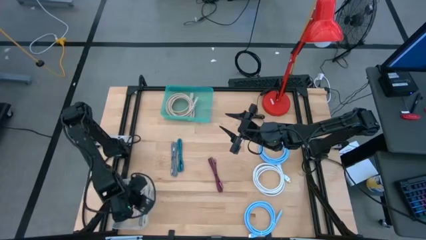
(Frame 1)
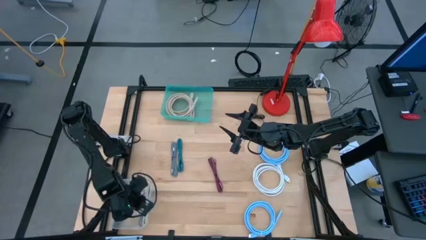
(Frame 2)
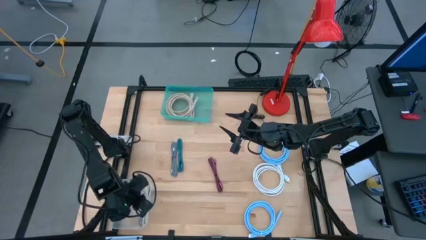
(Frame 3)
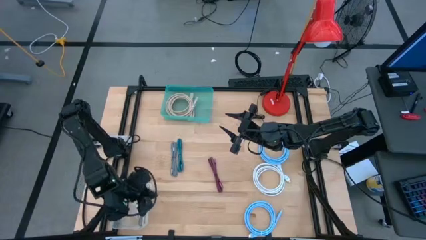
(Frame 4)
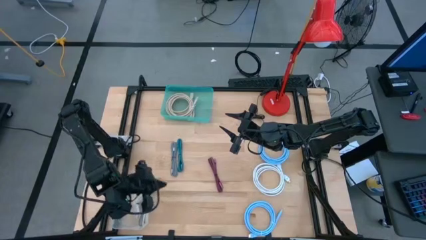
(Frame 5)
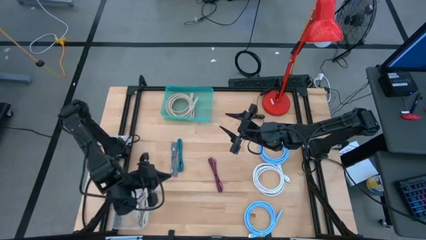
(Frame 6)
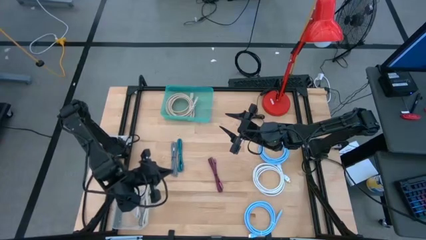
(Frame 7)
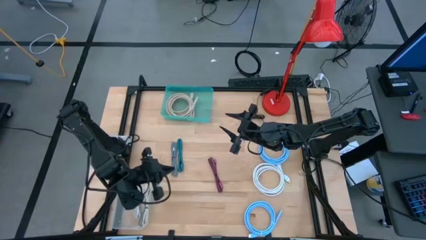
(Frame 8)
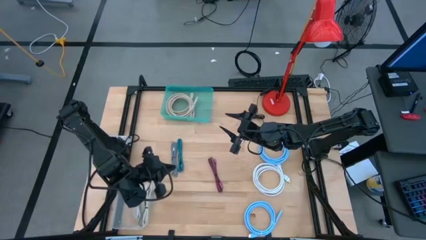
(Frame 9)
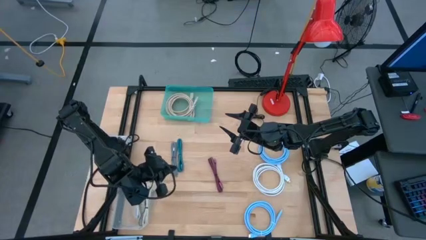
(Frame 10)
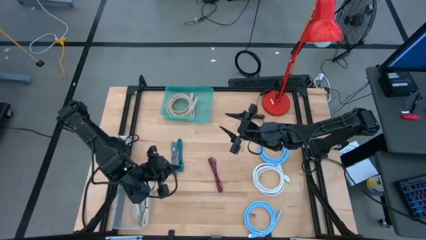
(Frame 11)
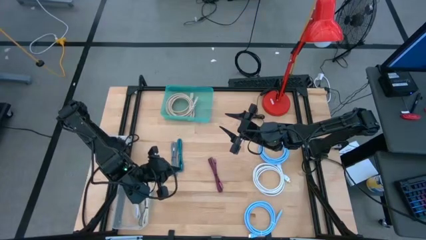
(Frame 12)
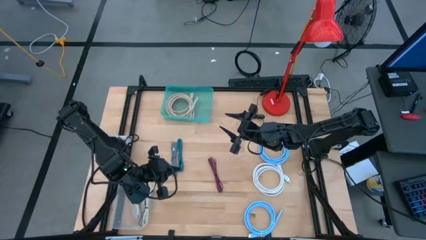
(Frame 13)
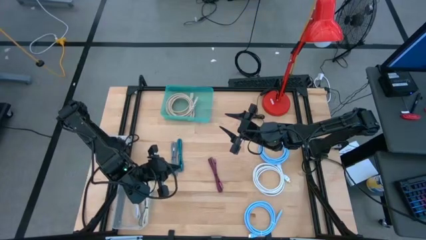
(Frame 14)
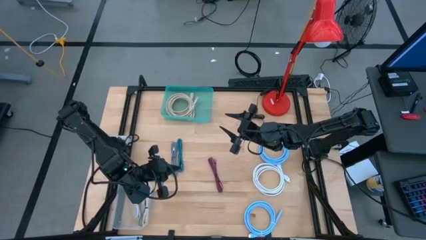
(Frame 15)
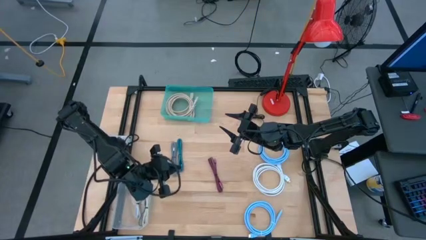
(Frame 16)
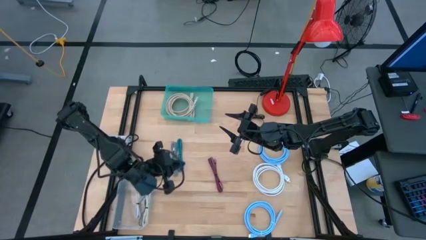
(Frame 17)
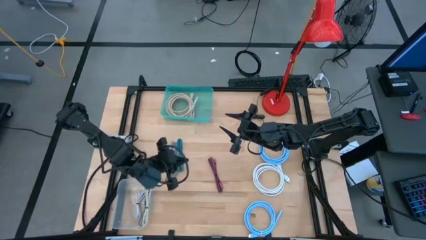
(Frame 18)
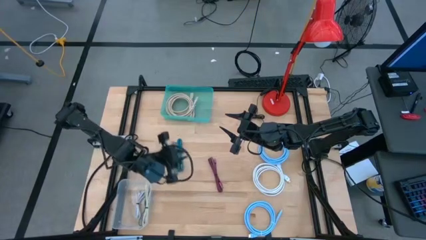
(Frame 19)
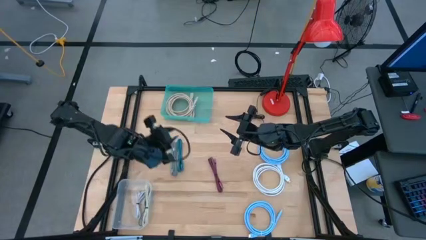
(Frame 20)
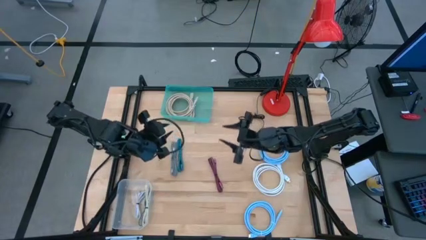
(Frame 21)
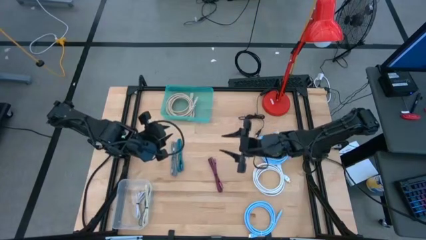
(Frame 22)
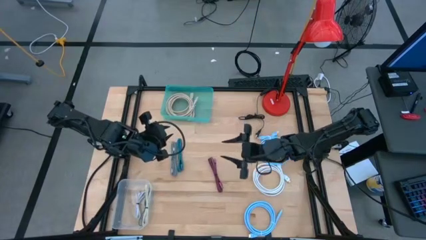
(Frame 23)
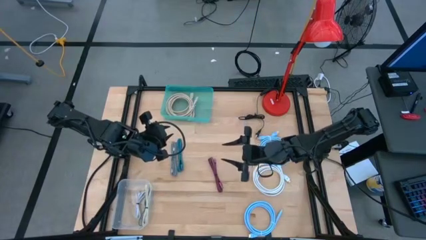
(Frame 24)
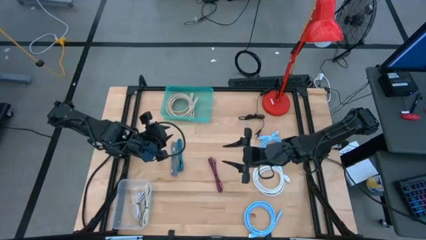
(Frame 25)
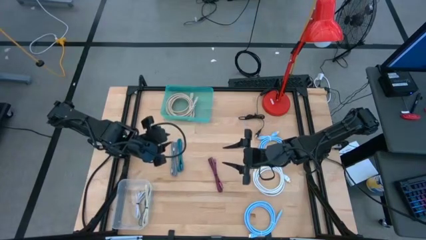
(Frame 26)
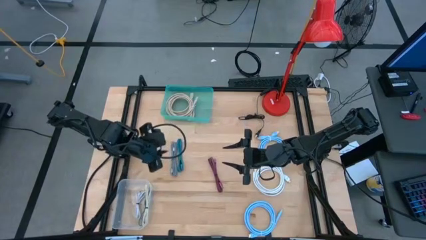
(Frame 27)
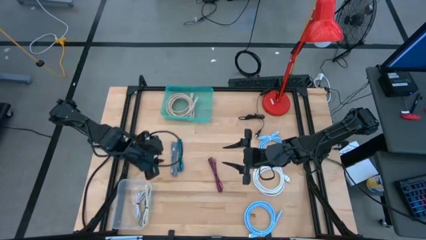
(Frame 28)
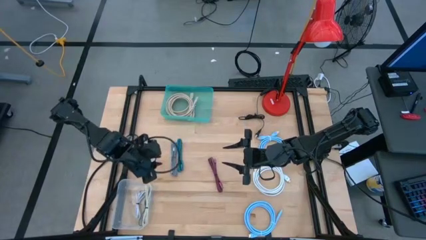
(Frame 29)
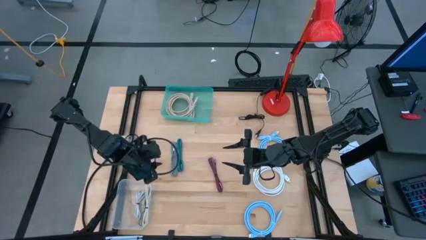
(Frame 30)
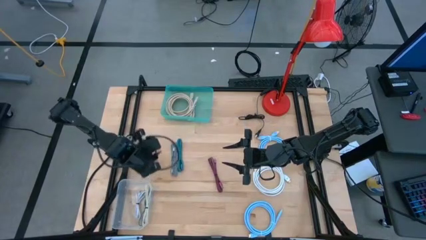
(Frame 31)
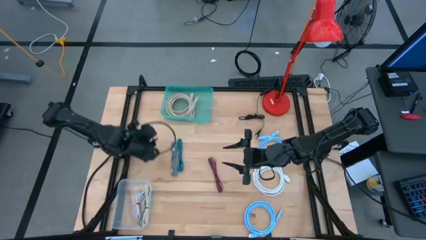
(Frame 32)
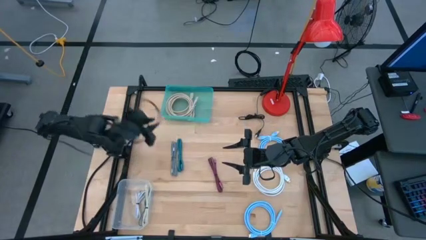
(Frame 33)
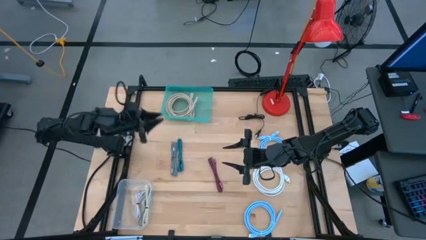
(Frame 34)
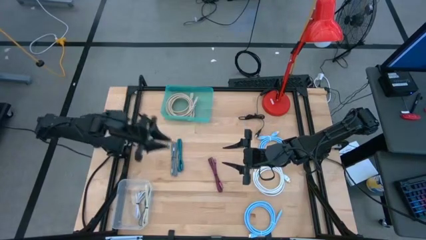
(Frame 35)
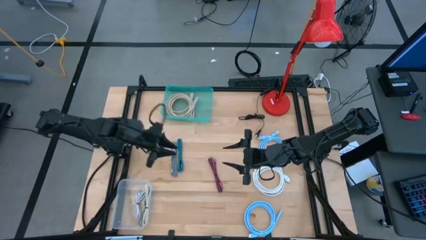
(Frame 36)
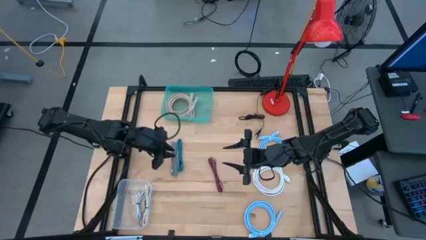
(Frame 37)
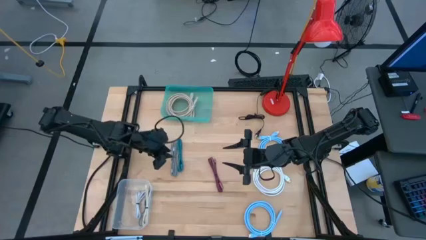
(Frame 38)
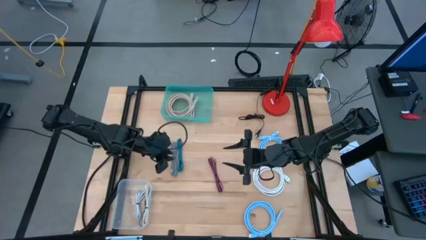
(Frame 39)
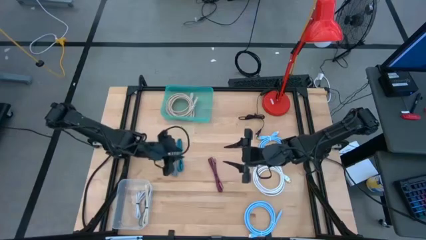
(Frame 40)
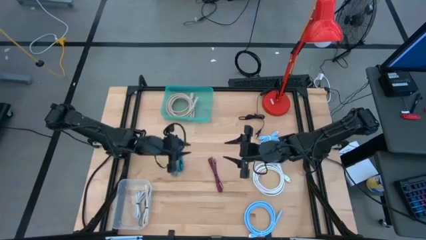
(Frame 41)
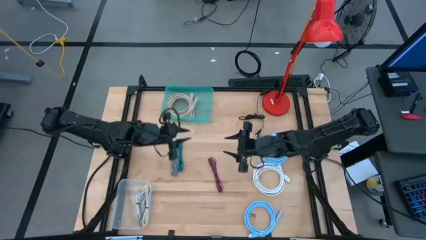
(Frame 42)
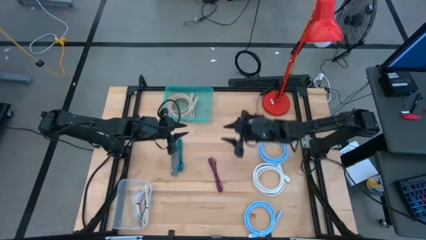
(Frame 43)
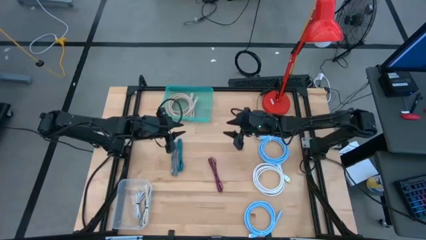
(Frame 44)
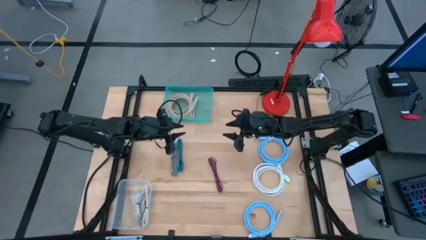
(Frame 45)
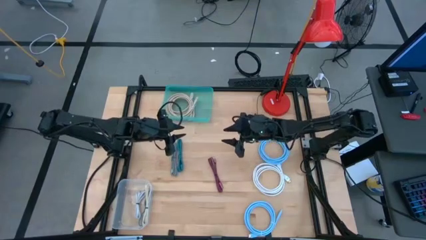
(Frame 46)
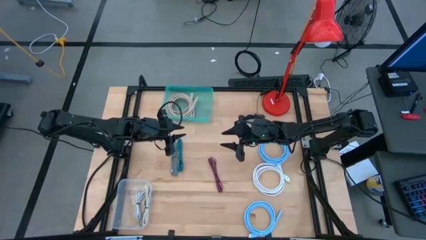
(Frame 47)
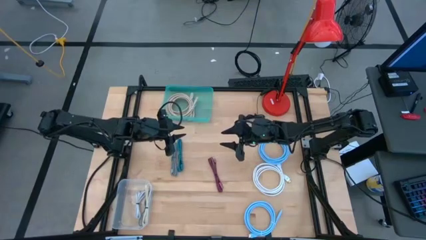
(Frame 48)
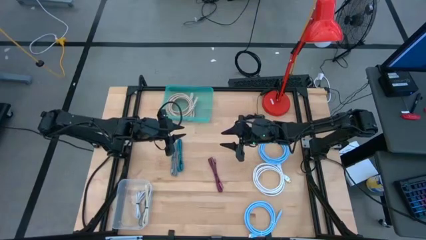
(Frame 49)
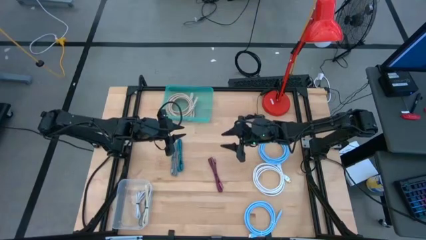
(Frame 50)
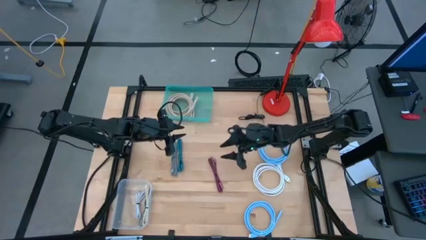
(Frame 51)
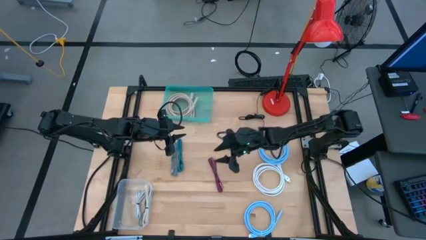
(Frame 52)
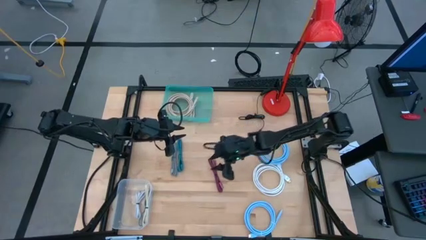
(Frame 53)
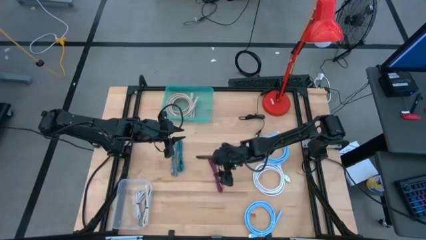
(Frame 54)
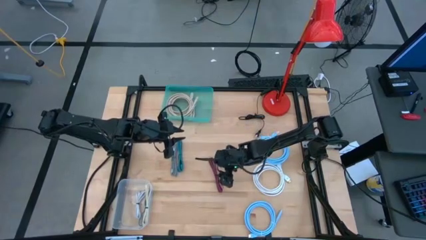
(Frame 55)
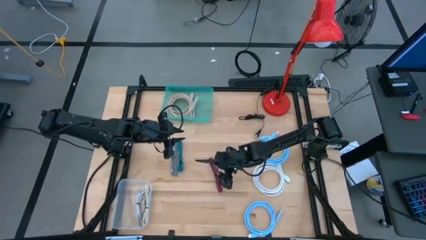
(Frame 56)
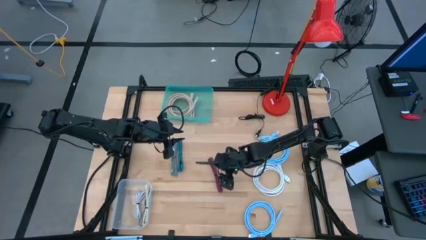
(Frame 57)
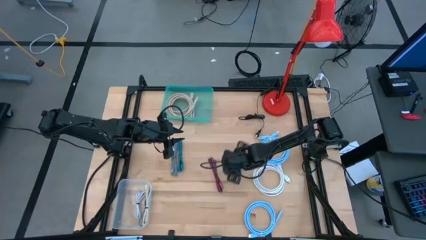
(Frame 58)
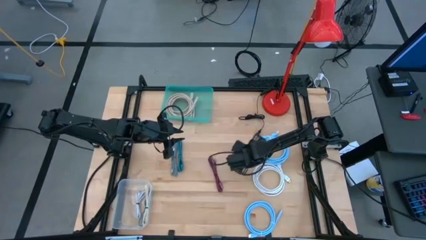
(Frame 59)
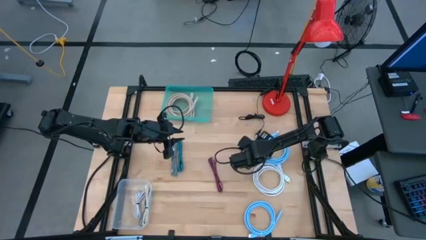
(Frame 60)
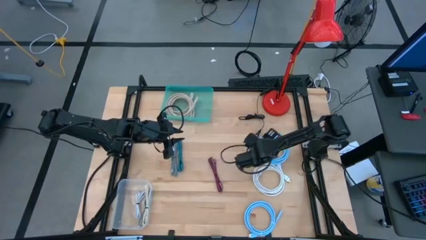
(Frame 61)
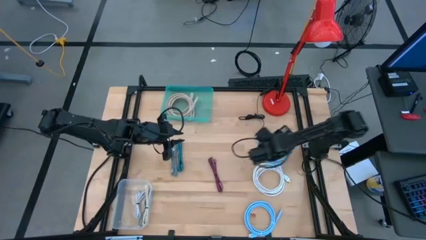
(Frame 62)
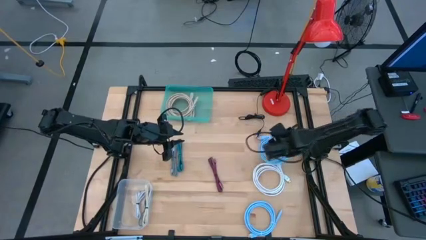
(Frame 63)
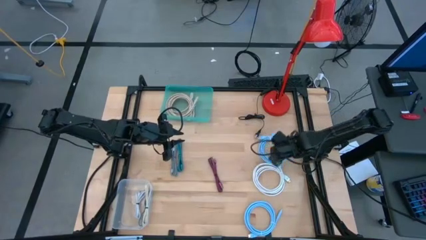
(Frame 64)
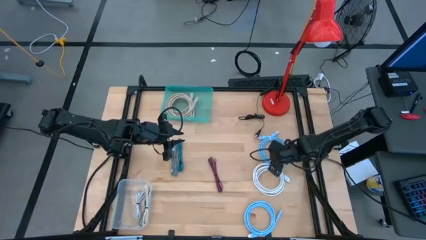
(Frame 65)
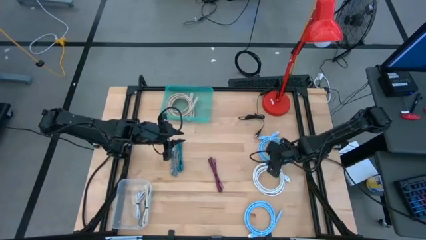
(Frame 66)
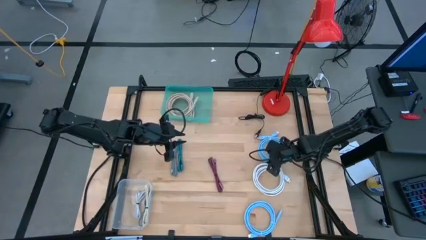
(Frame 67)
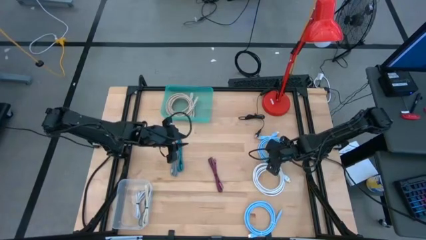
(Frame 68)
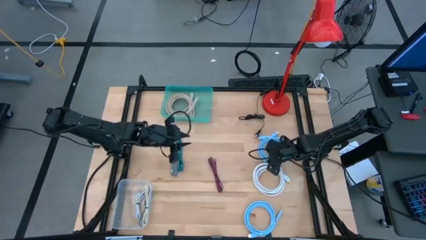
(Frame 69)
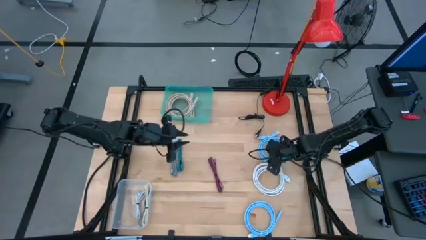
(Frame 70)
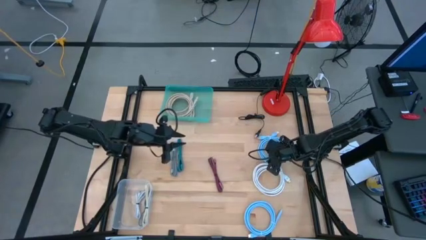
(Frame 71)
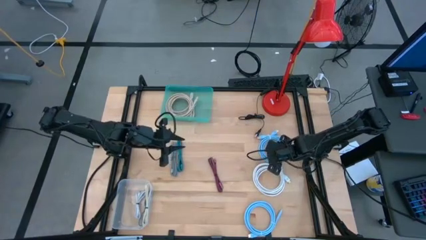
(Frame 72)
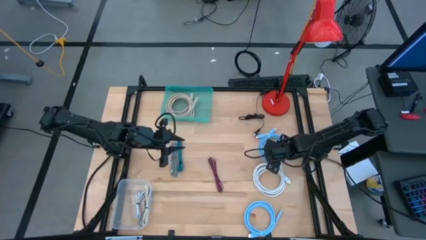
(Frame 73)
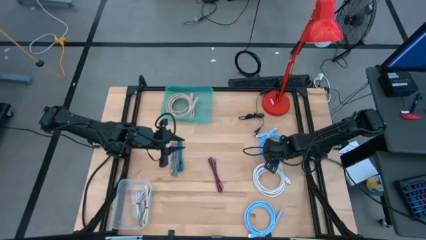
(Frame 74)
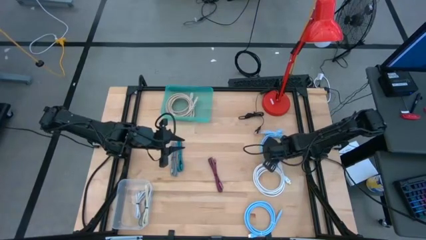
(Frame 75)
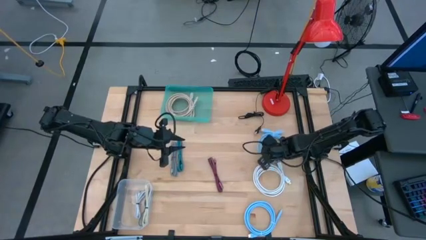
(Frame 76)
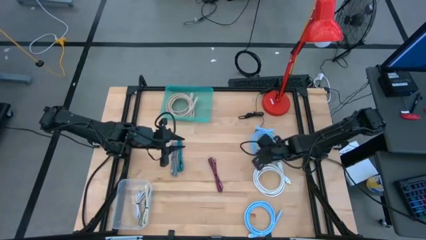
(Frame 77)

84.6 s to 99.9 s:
Task: Pick & Place USB Port
Put the top blue HDMI cable into the green bin

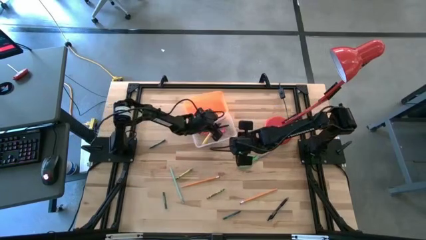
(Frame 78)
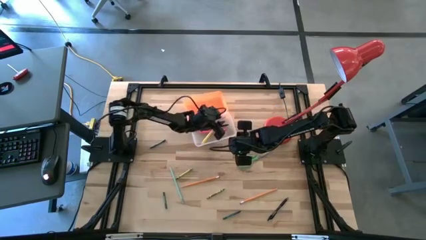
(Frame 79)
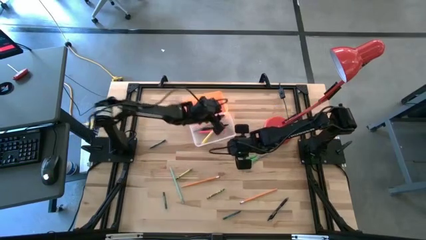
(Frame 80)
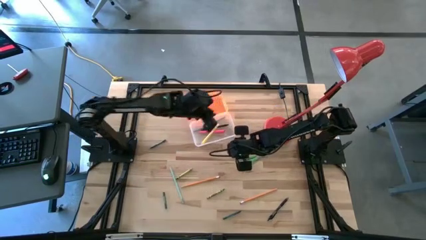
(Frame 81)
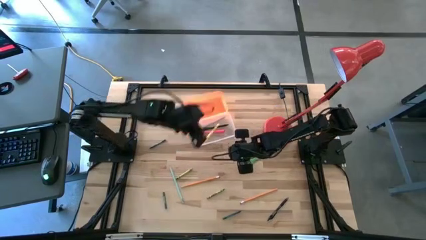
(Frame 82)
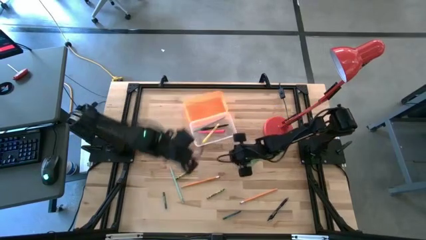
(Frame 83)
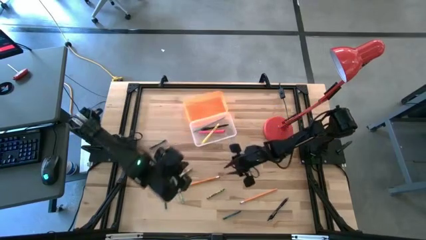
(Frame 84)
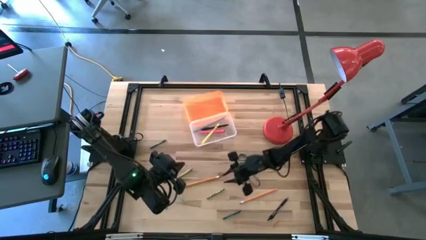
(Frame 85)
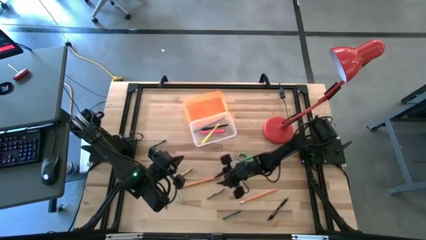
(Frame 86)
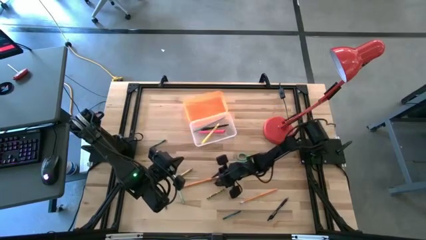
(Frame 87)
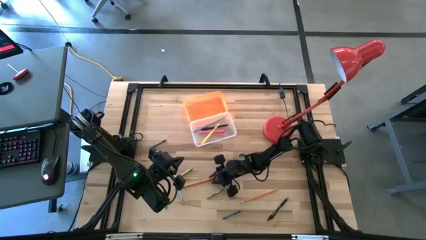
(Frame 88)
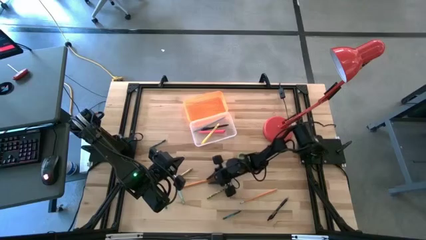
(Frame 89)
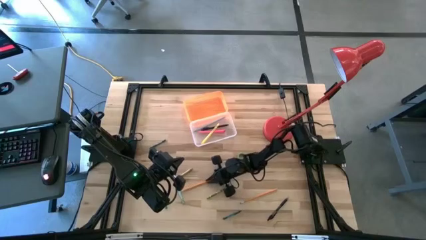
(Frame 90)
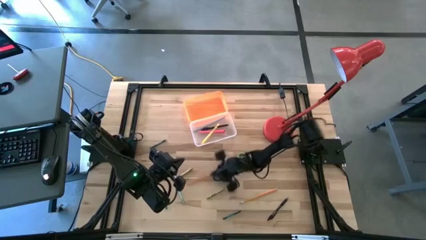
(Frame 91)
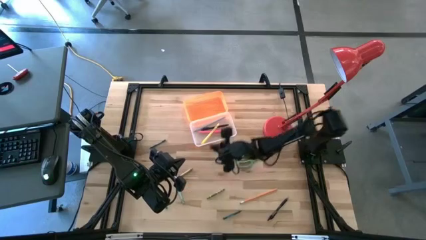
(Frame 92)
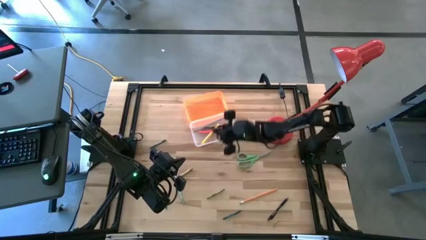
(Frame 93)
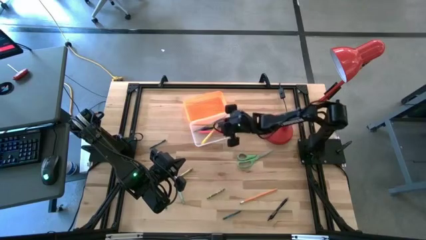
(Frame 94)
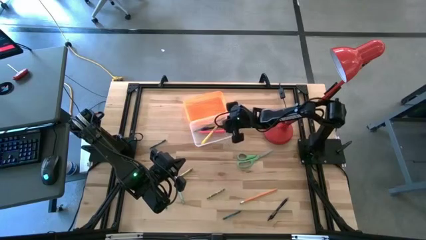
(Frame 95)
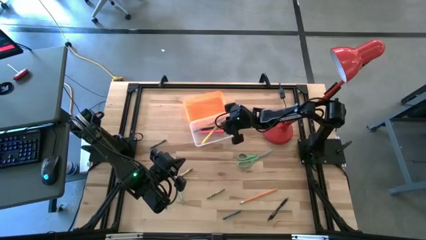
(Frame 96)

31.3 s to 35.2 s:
Task: Pick & place school supplies into a supply box
Put the orange pencil into the orange supply box
